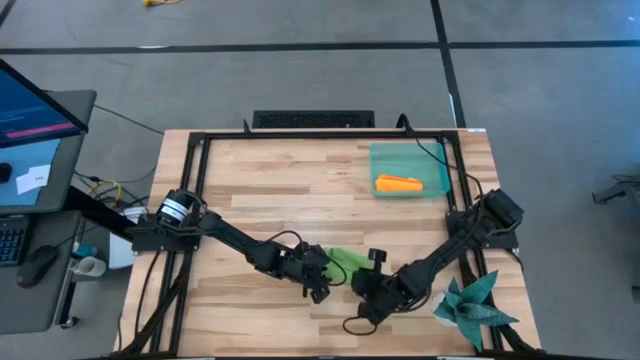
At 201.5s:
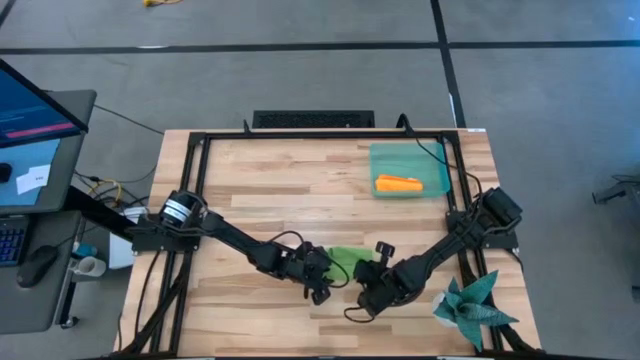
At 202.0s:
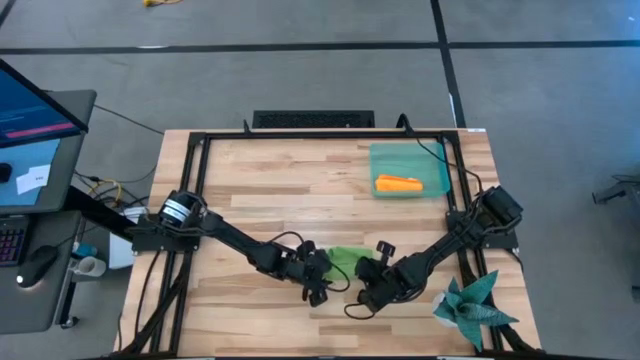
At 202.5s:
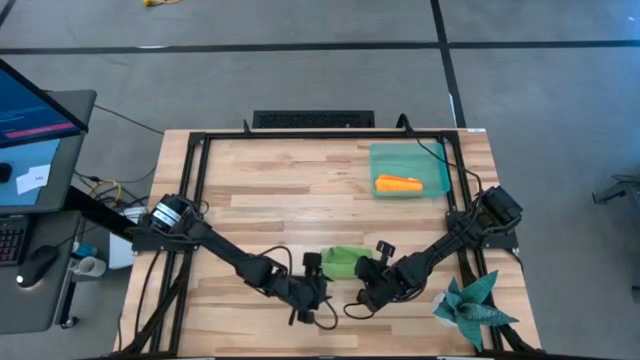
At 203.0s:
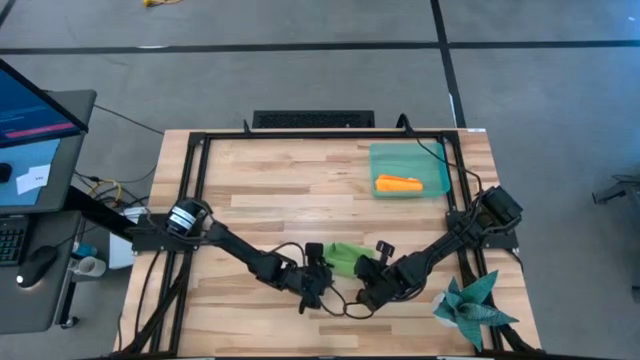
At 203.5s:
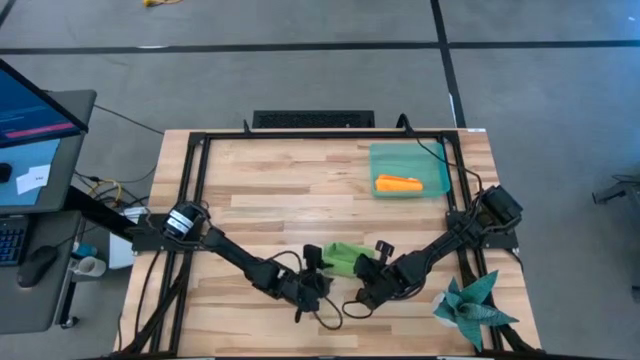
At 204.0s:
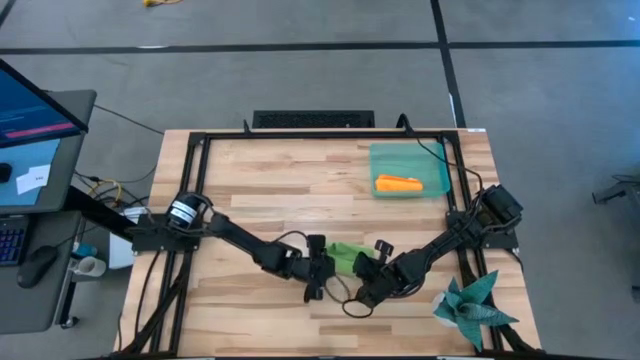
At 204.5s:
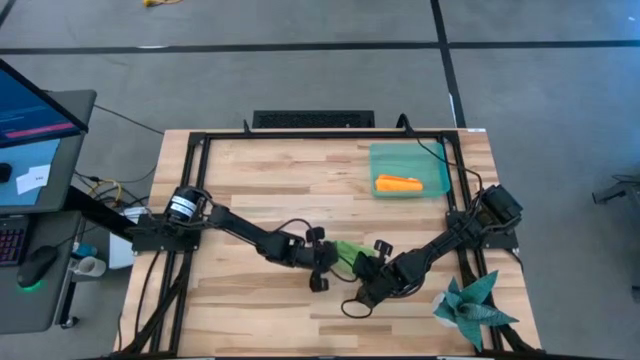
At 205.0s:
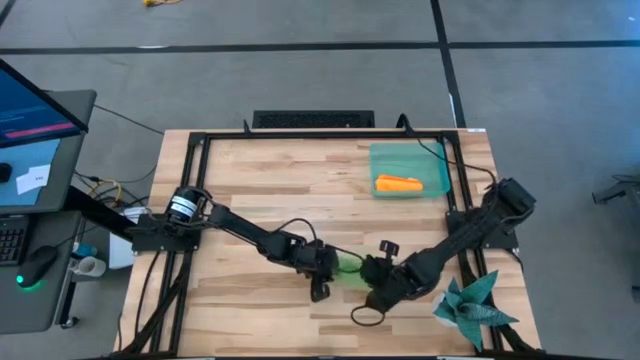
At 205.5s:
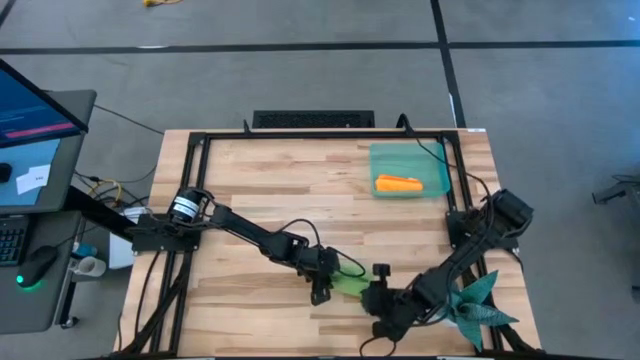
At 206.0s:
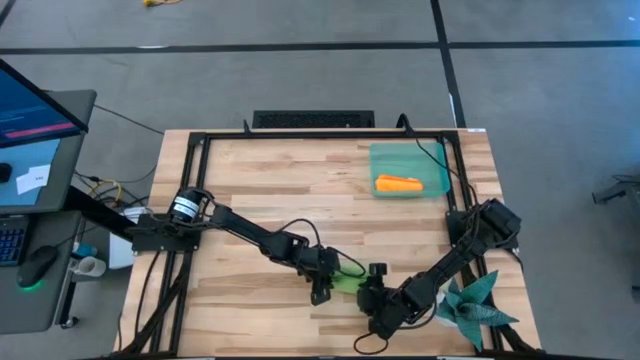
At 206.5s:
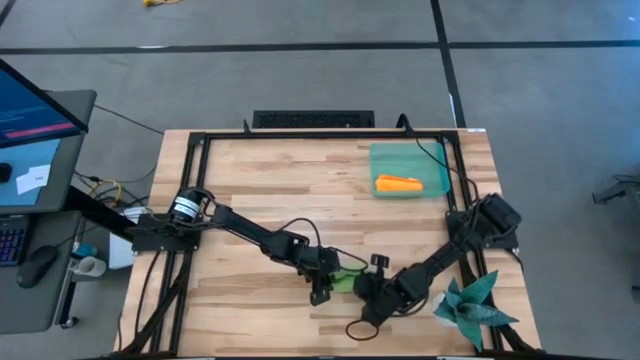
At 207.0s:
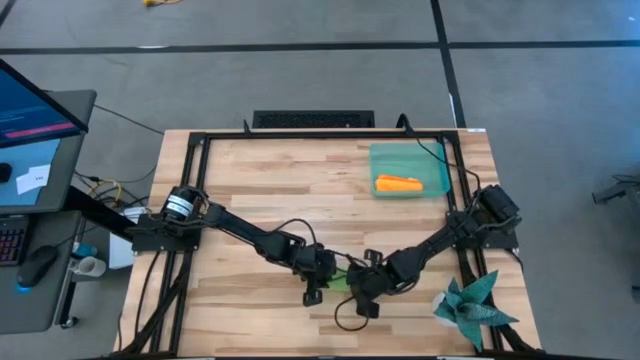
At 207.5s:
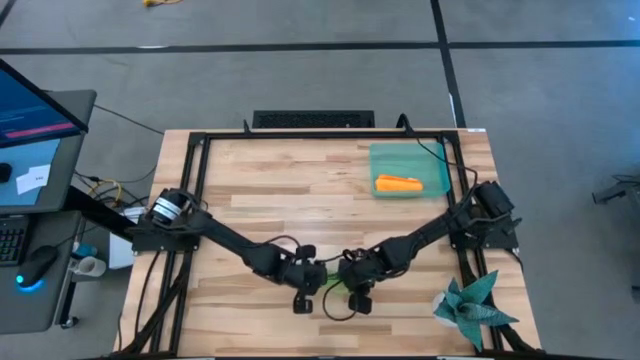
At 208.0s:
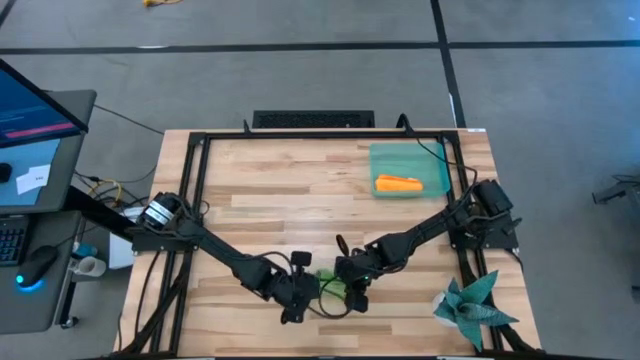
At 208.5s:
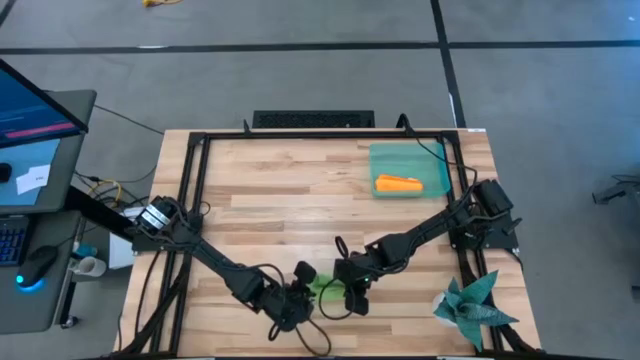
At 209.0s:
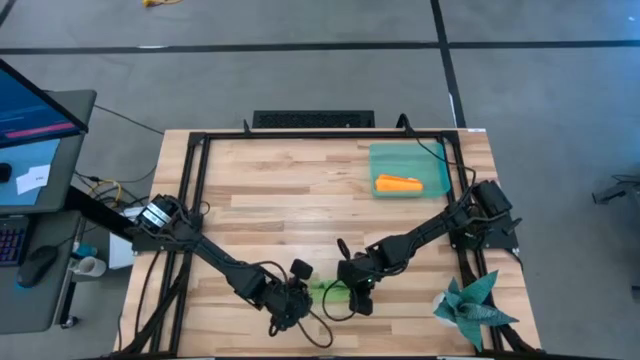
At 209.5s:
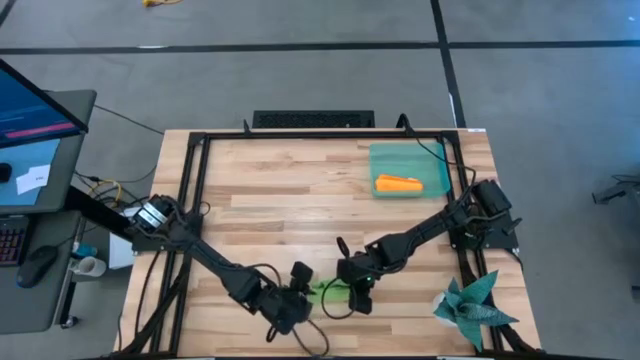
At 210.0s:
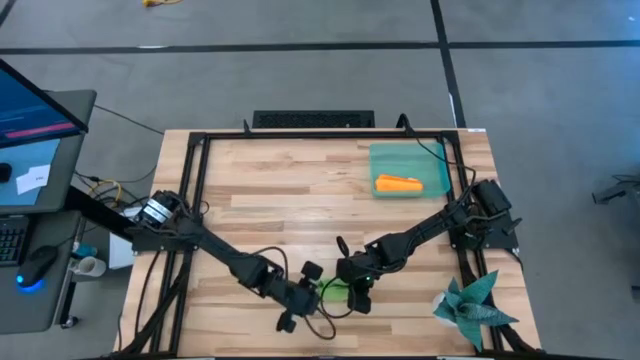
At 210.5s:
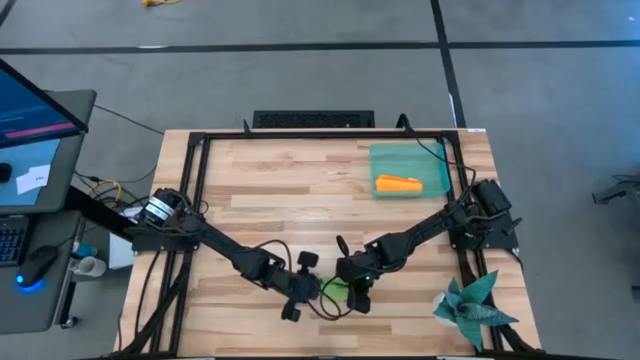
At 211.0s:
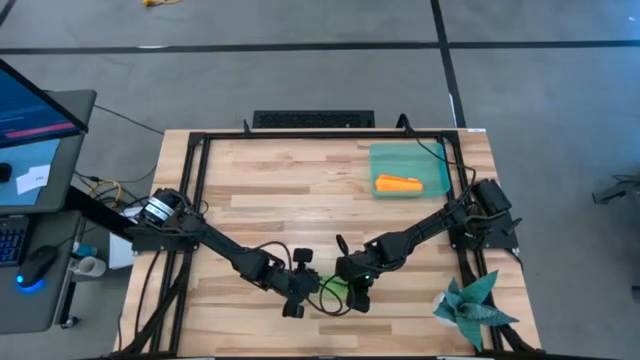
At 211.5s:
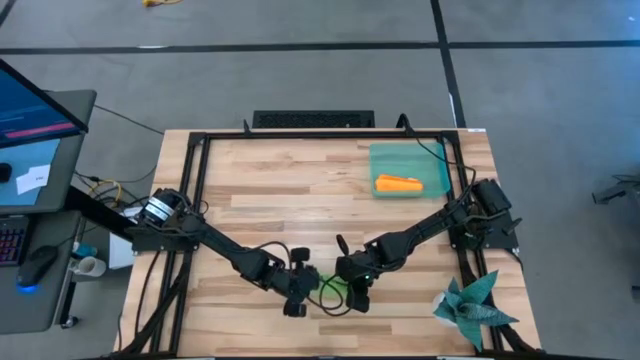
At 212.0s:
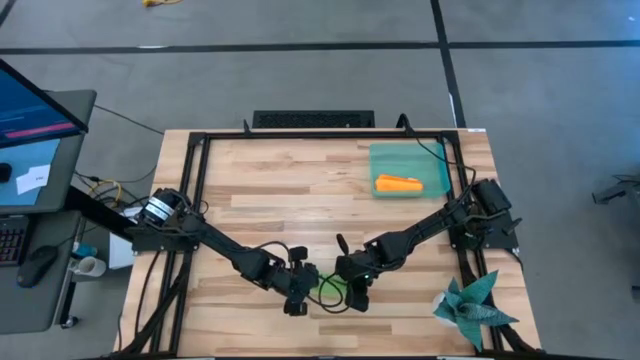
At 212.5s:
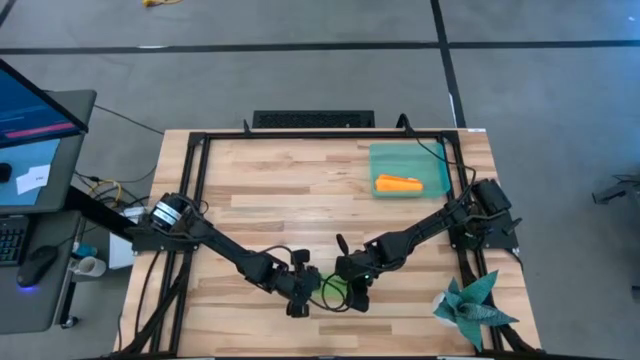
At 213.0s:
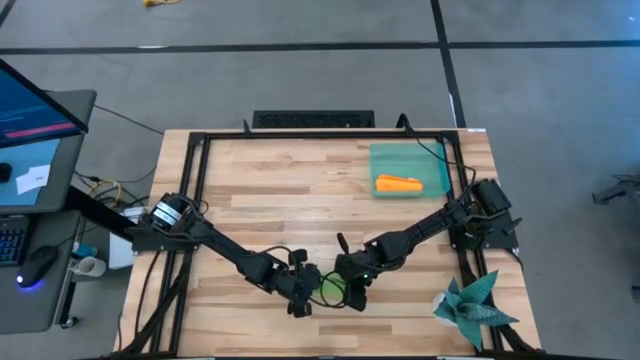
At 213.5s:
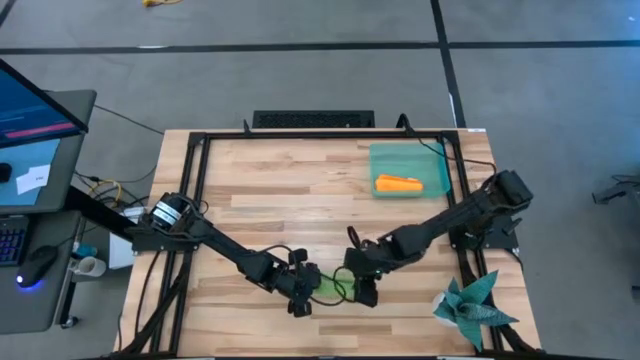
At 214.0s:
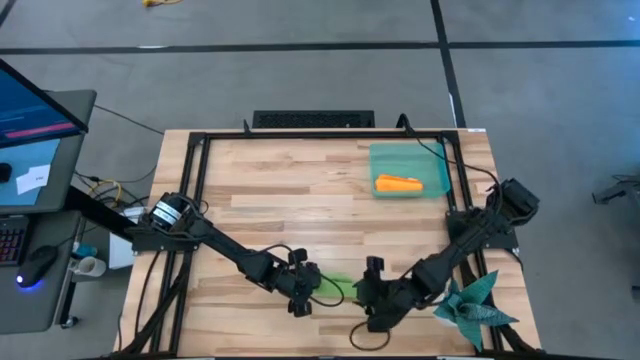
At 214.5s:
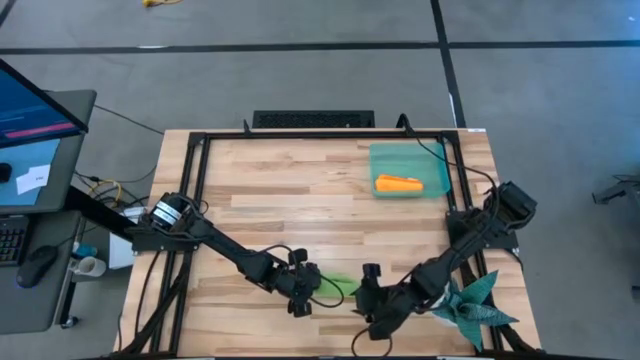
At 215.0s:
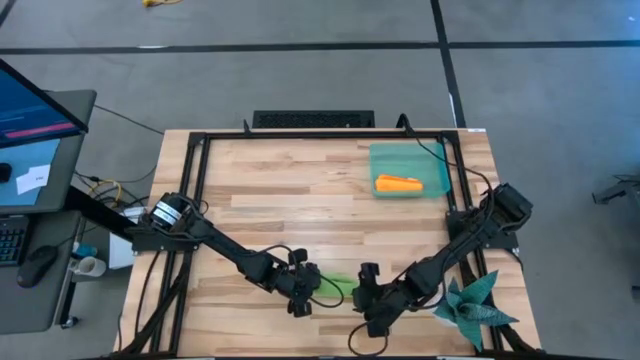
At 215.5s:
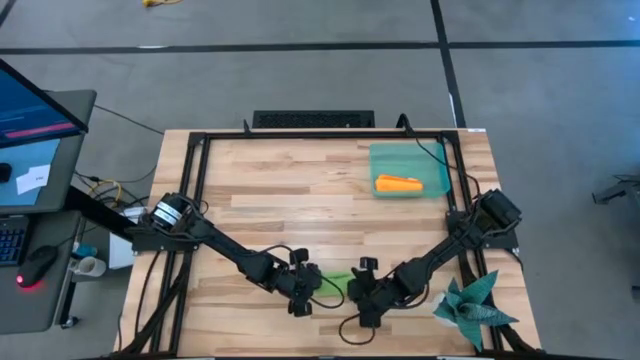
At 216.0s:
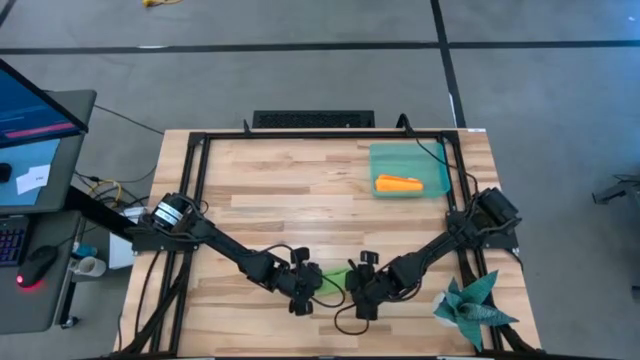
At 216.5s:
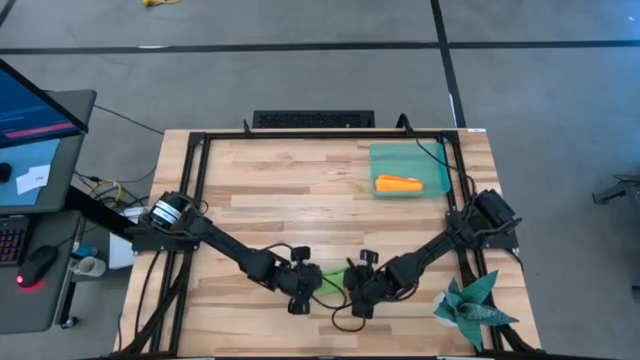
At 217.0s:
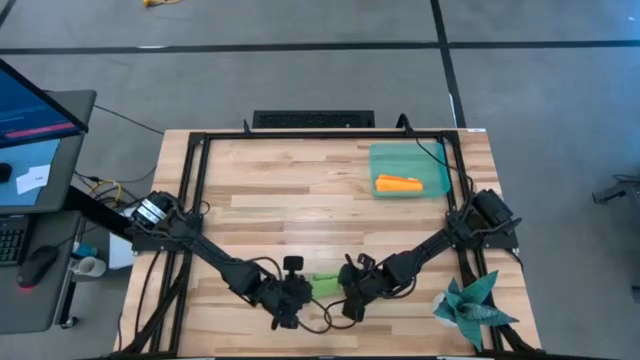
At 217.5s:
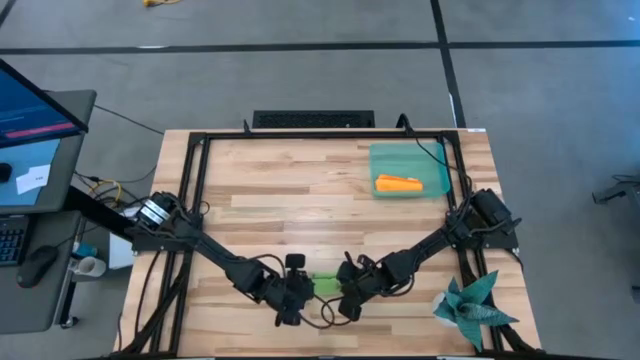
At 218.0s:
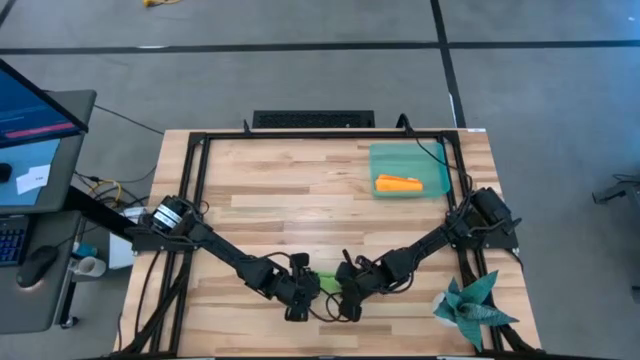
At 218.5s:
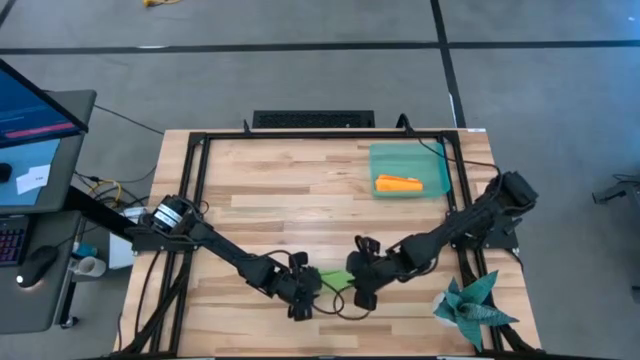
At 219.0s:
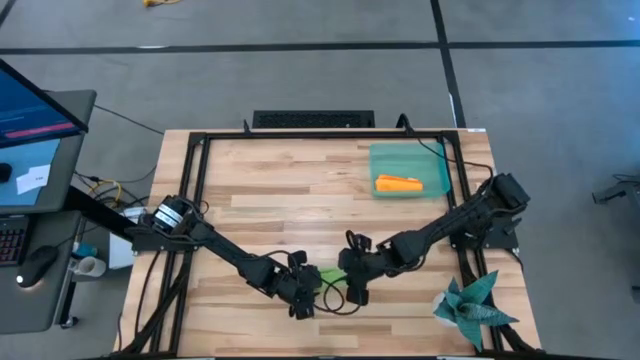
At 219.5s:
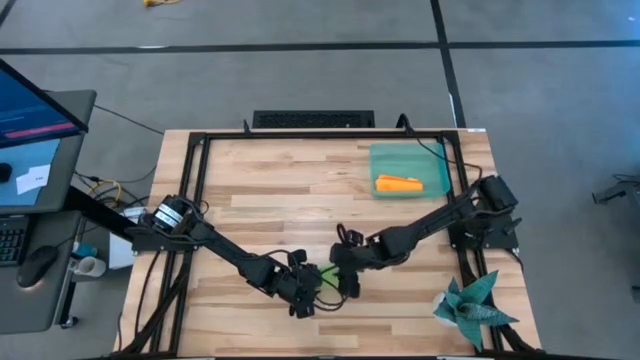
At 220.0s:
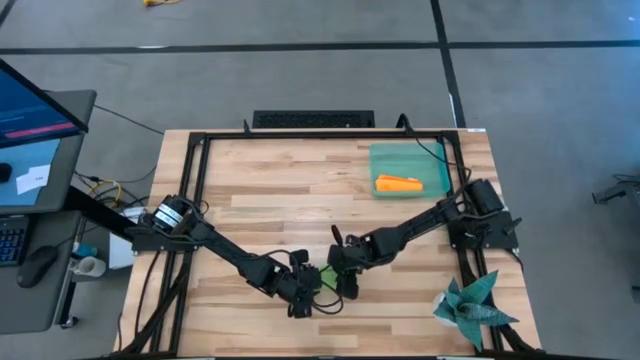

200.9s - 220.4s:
Task: Roll microfiber towels into tight, uniform cylinder then place into a basket
Roll the green towel

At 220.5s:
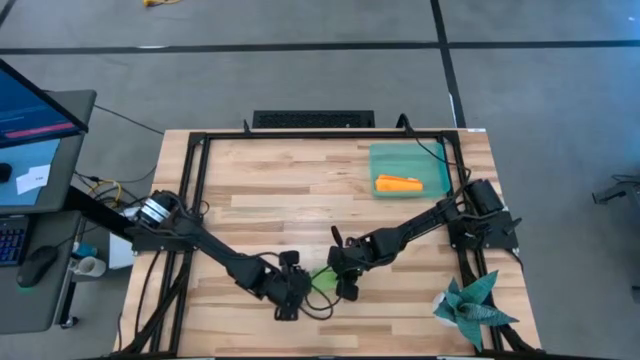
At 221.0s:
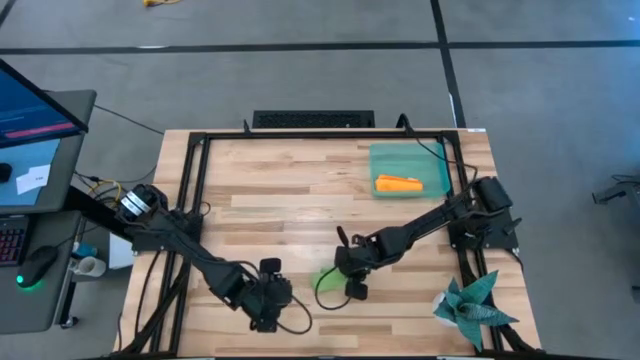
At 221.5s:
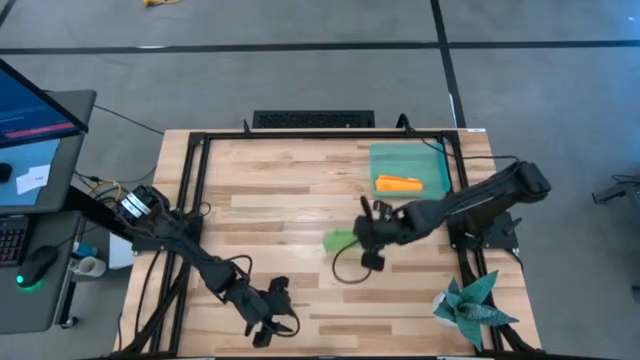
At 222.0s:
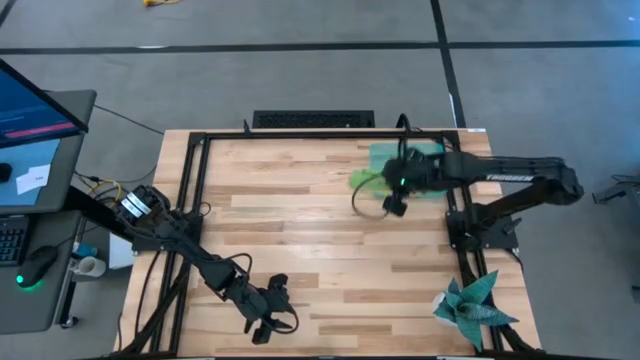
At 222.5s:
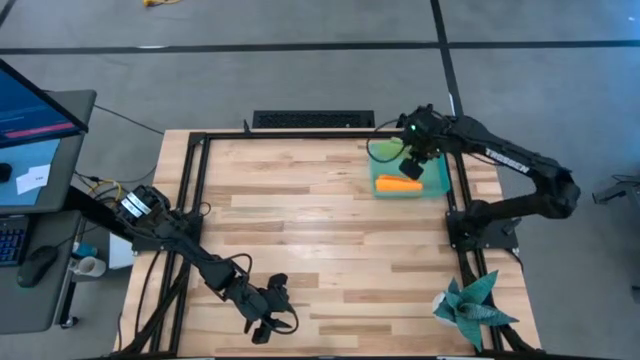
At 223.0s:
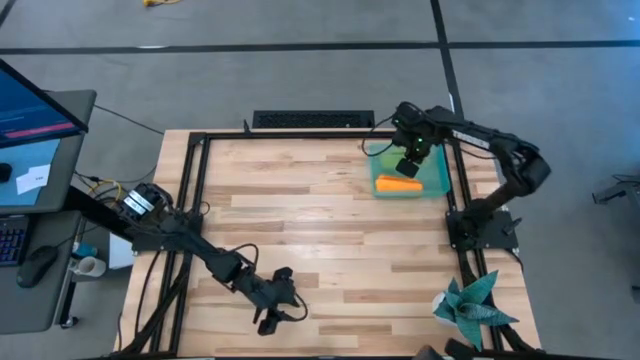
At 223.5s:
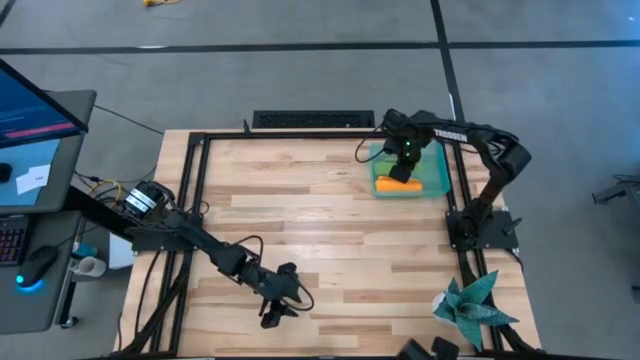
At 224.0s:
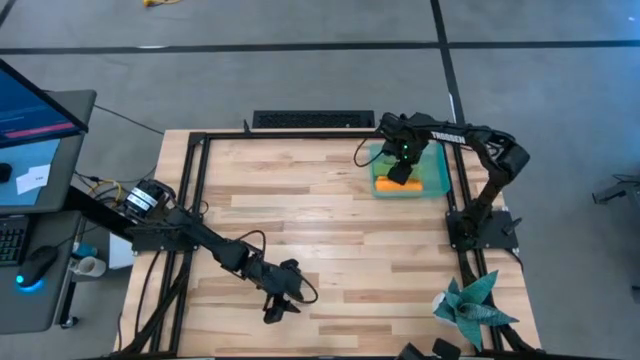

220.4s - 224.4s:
Put the rolled green towel into the blue bin
